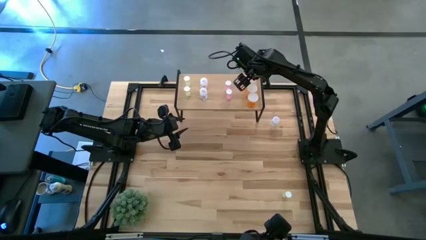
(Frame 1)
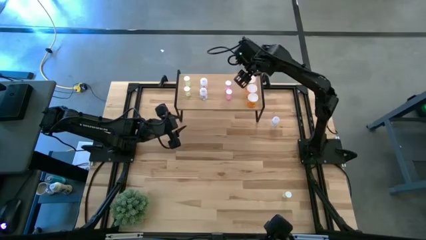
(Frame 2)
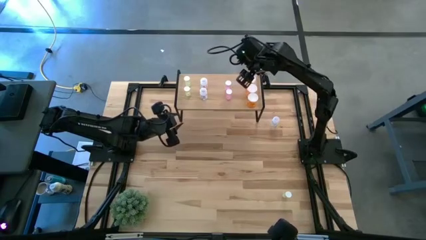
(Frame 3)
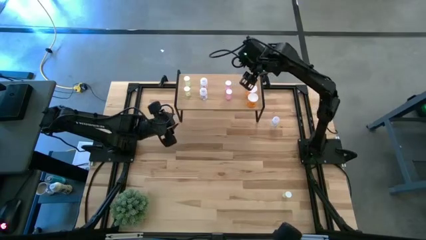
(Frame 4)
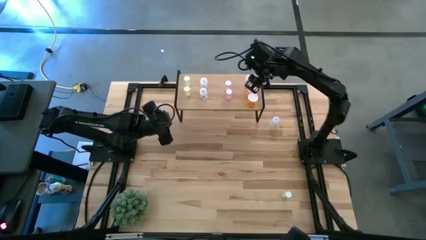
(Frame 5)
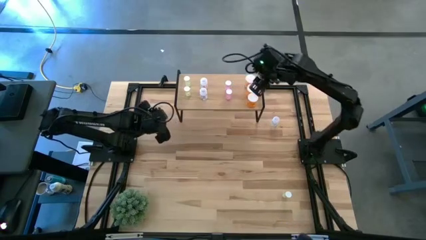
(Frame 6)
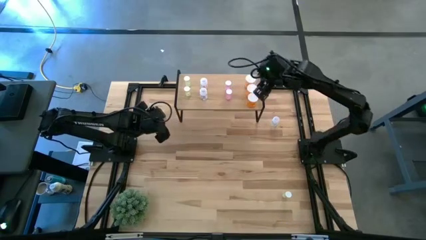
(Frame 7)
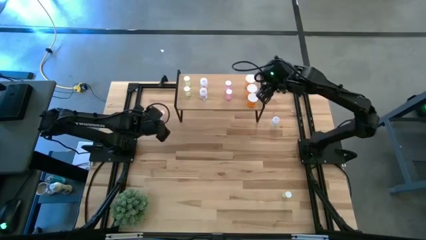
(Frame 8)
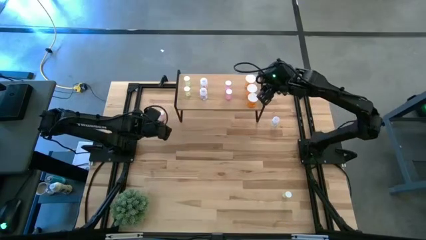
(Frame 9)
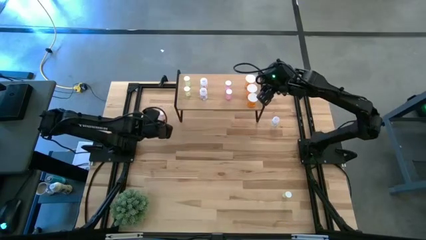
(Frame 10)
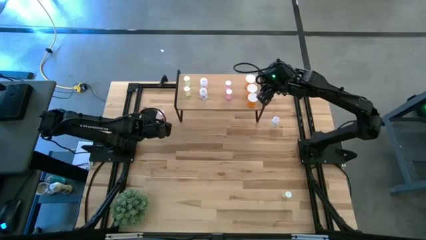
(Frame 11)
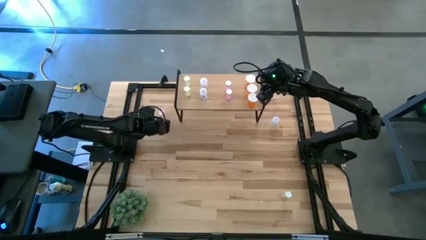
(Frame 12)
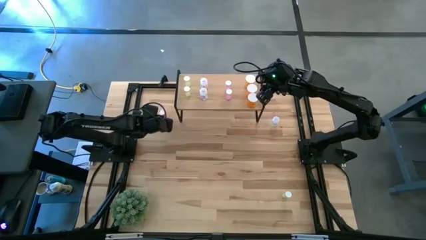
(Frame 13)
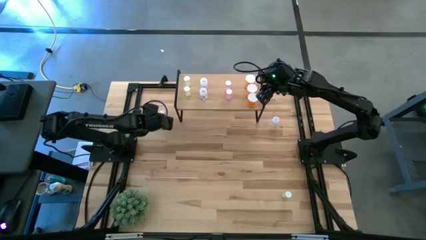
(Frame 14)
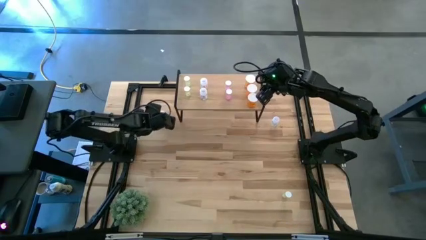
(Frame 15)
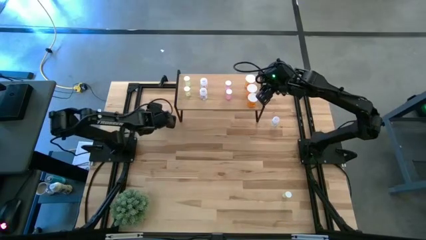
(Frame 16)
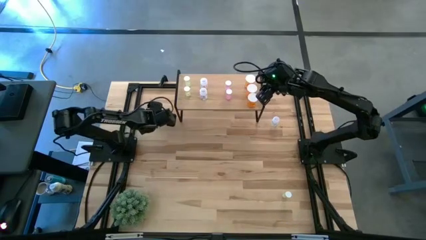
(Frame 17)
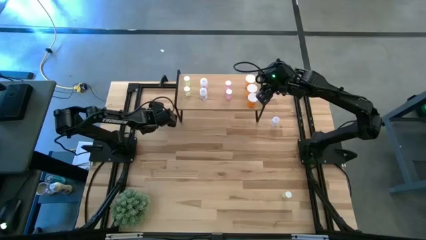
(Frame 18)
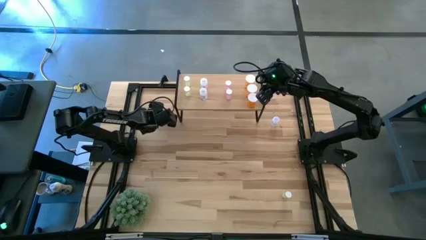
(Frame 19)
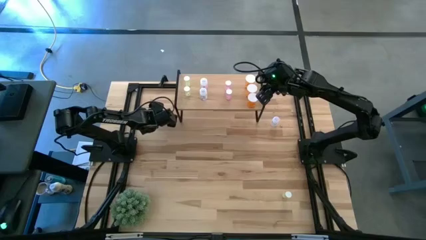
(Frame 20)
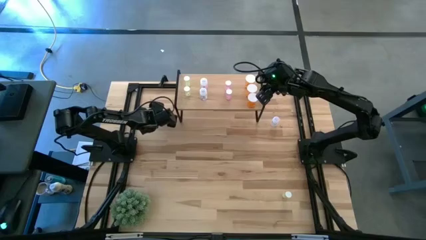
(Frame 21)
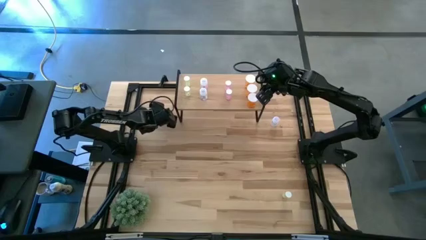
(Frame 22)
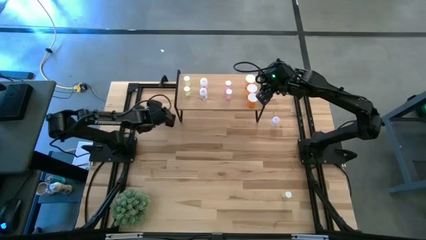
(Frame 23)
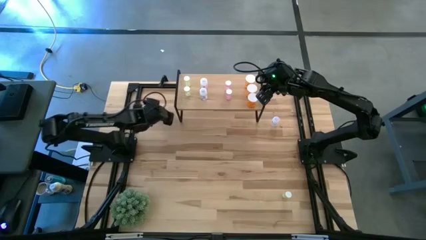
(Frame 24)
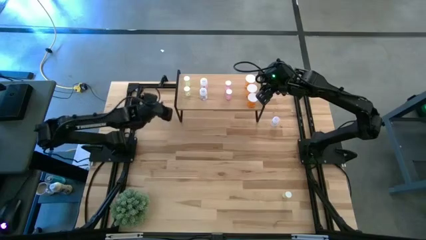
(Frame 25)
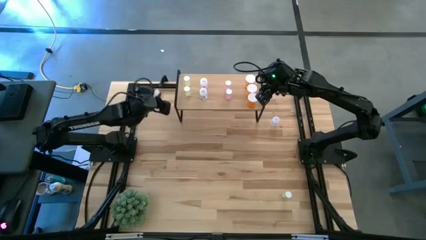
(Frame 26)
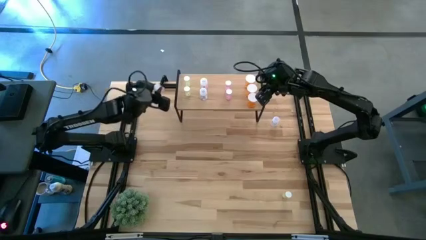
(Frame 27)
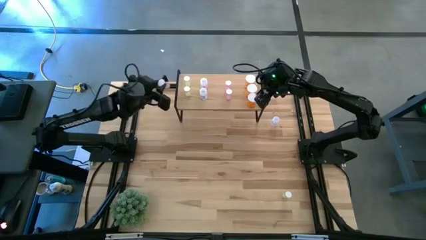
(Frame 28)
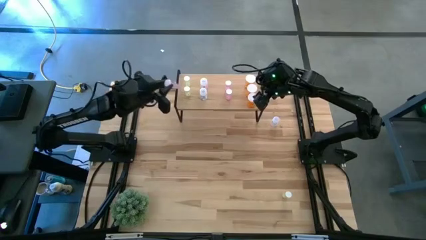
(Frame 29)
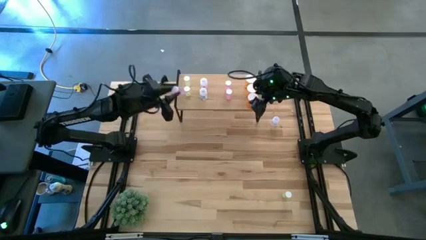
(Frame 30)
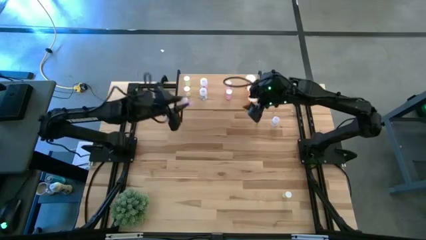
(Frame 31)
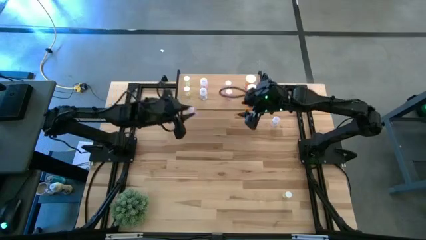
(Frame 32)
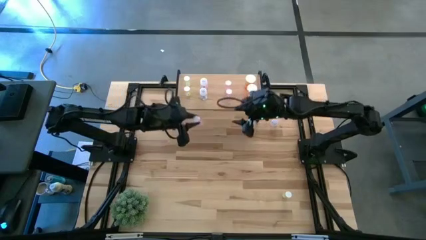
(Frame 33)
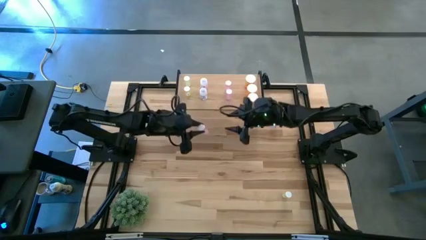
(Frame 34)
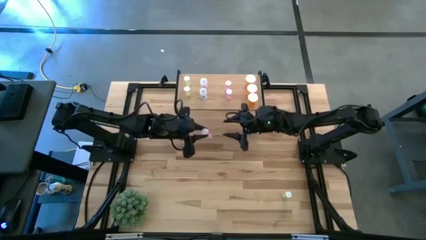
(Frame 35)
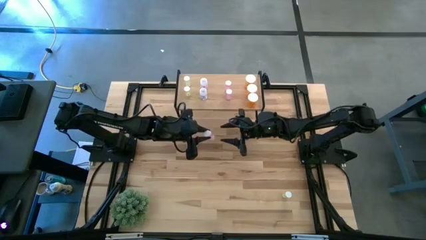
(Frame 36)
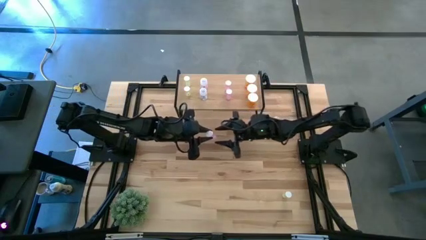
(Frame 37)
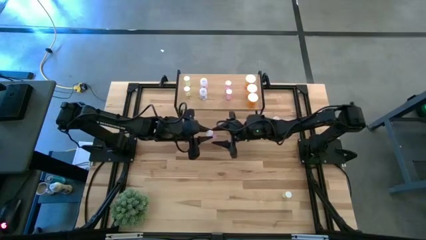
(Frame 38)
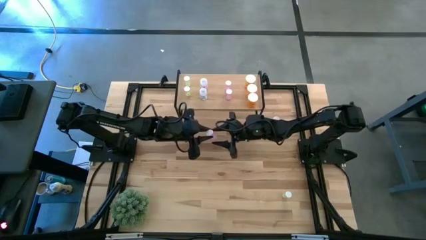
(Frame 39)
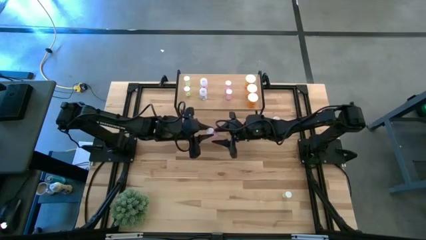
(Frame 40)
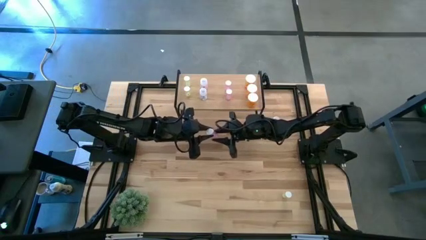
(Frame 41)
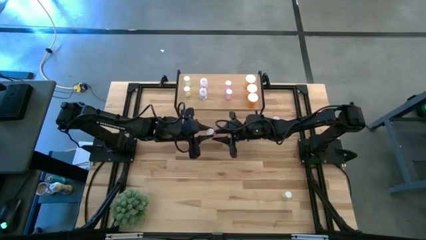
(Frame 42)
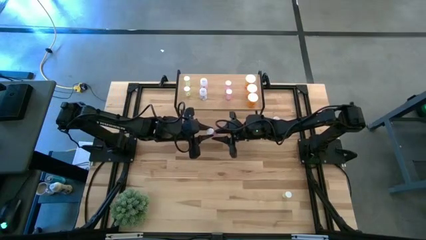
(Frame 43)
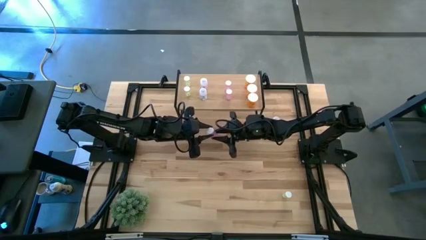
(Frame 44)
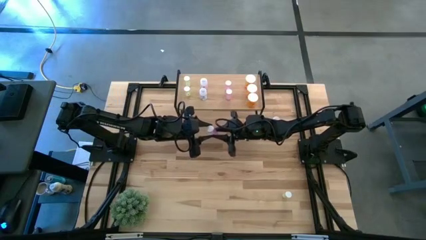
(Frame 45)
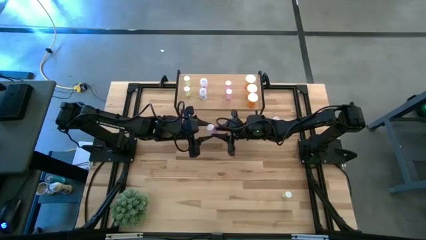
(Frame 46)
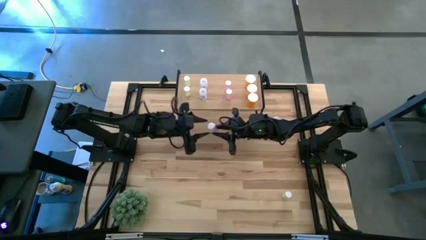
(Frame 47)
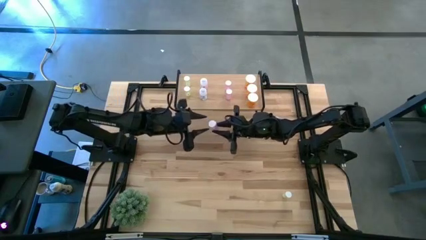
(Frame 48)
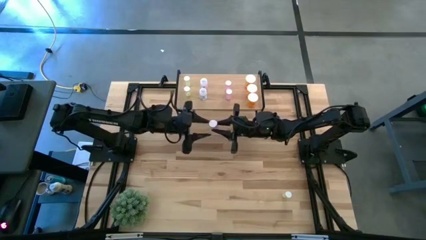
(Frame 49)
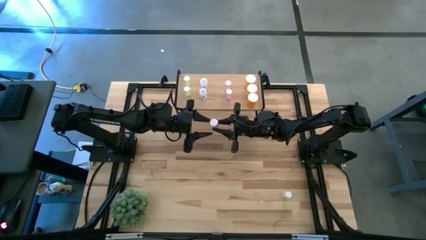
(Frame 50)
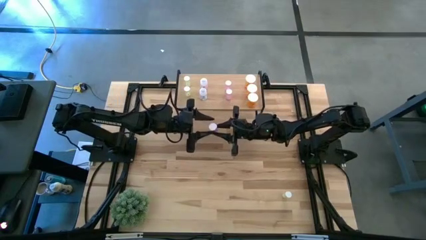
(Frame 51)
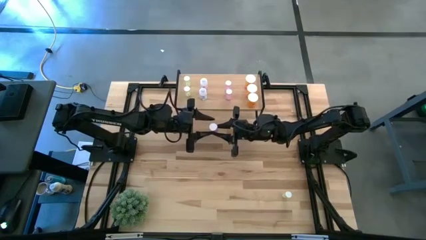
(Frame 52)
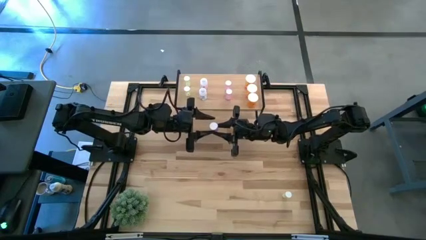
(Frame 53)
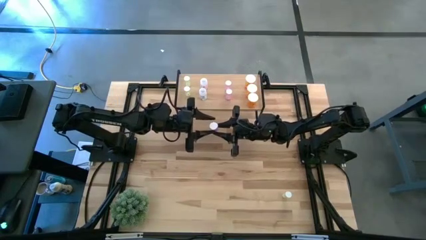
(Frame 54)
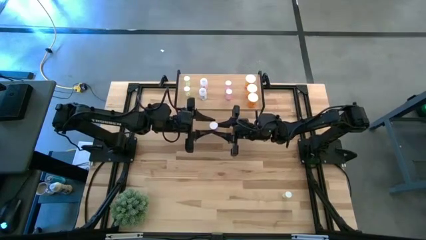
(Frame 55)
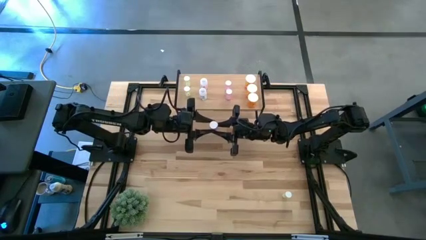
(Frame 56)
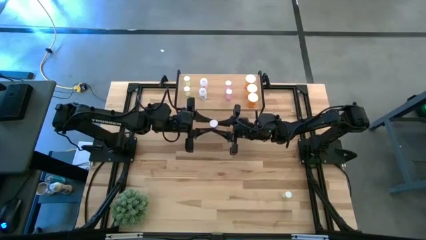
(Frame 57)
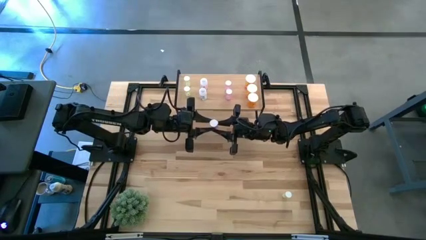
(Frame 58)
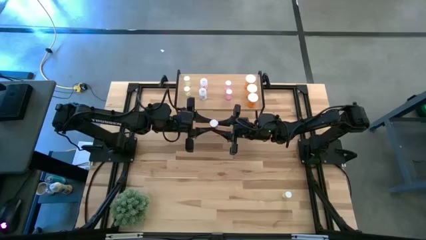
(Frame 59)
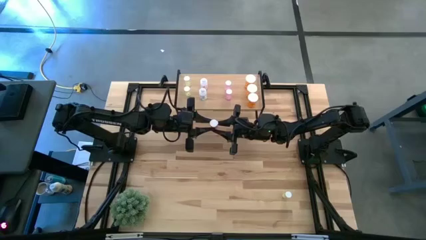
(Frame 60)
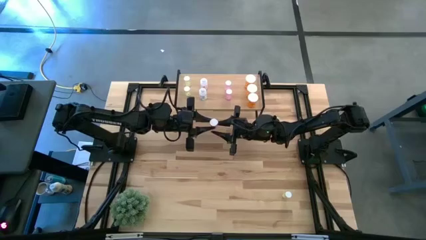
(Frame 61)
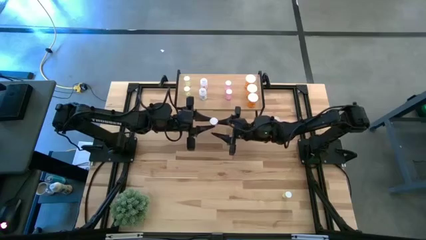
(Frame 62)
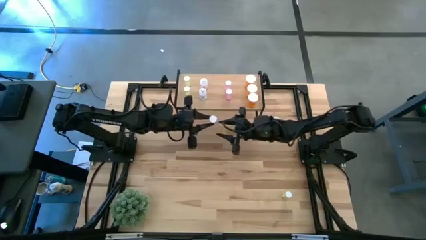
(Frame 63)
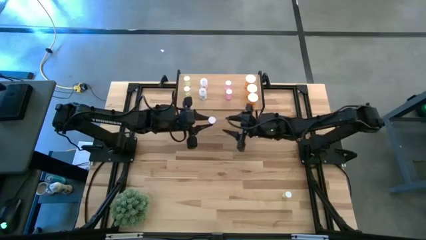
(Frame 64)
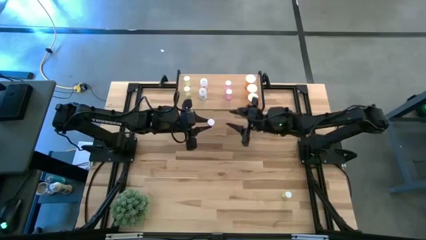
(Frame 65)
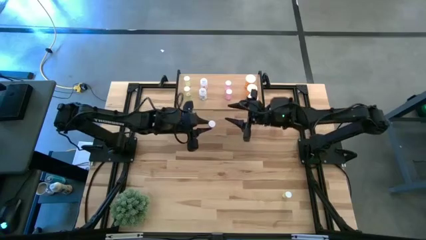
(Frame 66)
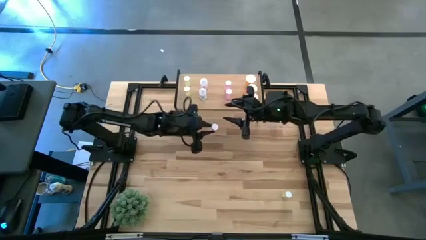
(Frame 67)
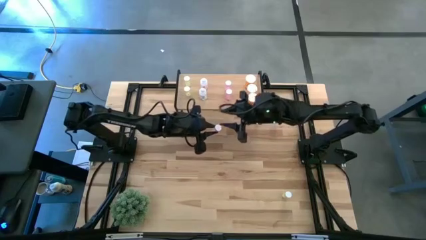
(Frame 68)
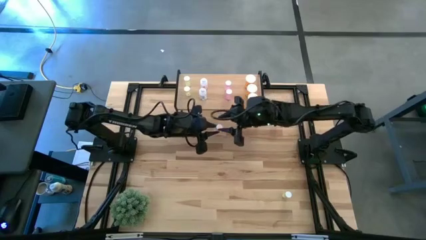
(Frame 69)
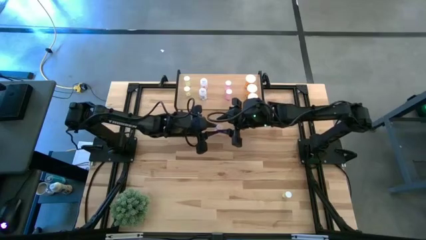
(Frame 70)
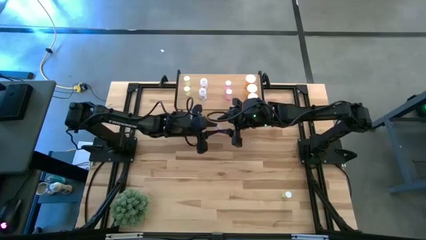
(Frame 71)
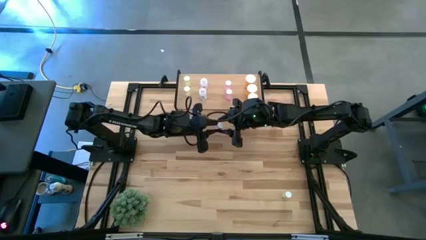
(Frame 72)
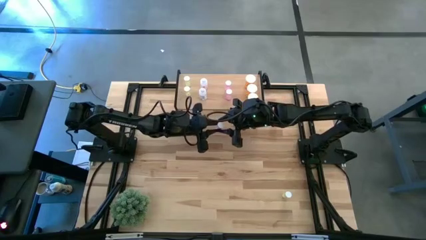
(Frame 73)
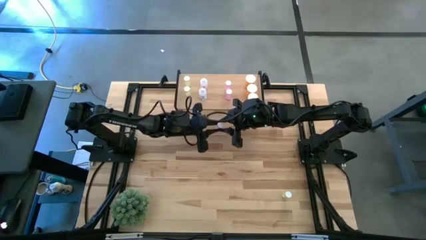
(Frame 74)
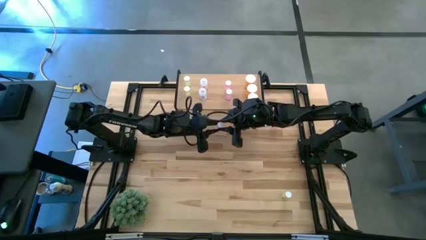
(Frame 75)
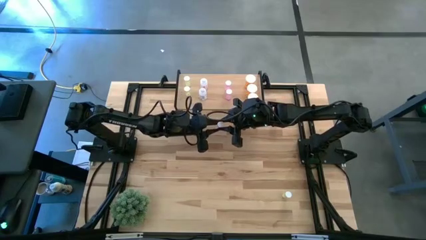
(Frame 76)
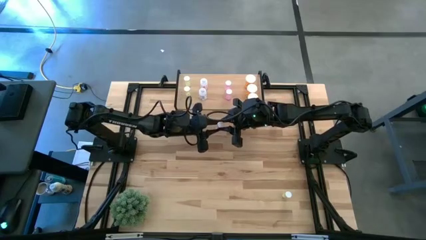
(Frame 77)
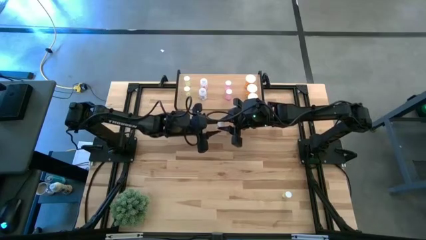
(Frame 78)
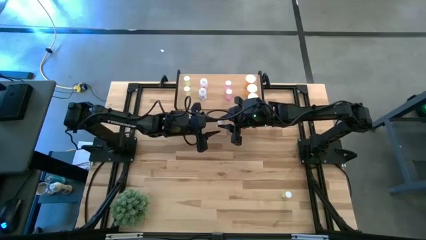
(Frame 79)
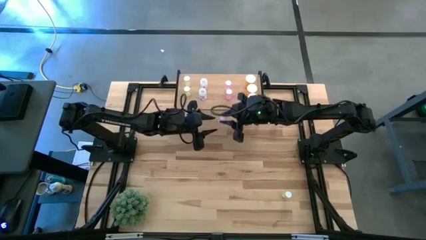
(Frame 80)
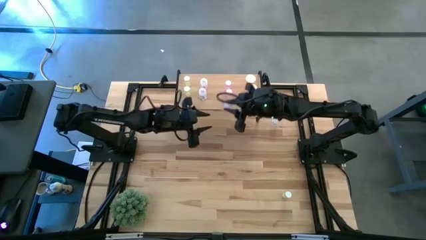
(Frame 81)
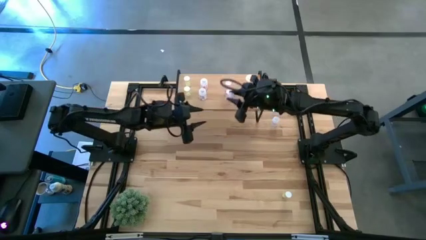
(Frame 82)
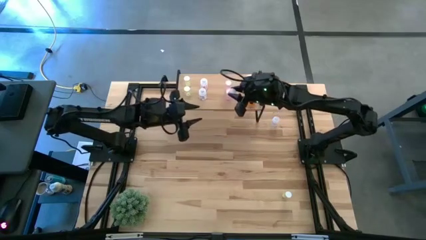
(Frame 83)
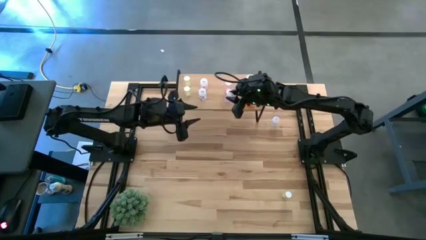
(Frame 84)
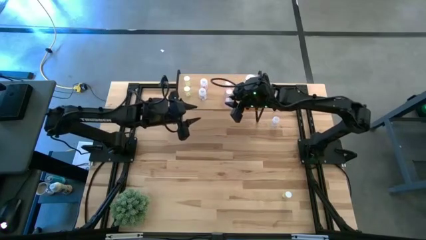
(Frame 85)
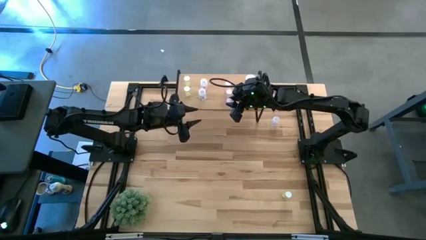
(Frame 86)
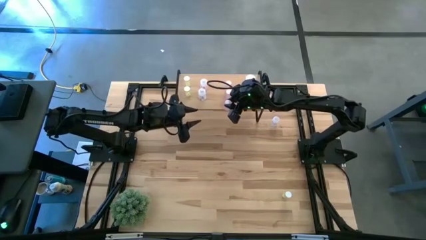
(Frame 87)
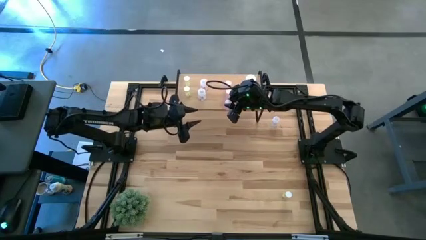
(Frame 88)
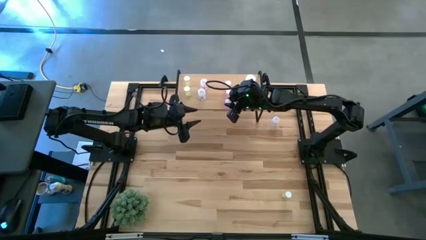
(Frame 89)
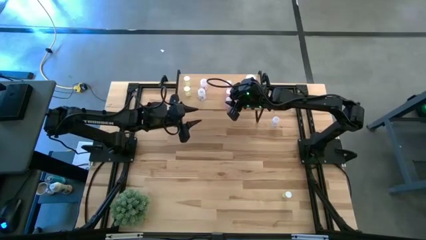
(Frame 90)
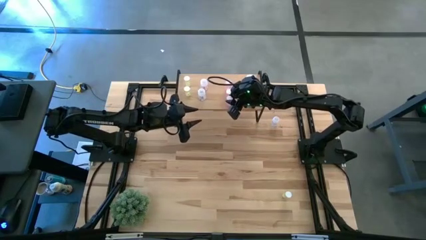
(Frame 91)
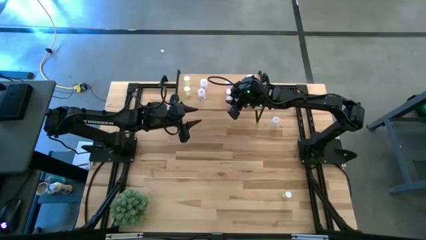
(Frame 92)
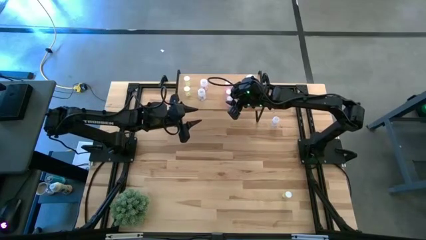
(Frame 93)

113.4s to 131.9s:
Task: Pick and place medicine bottles onto shelf by color
Put the pink pill bottle aligned with the other pink pill bottles on the shelf
